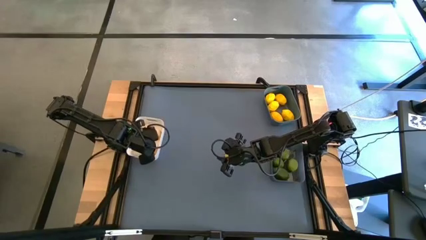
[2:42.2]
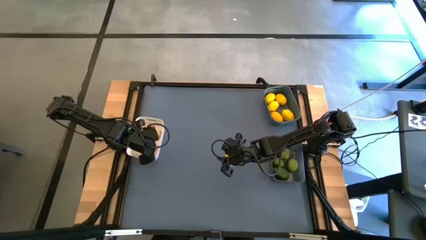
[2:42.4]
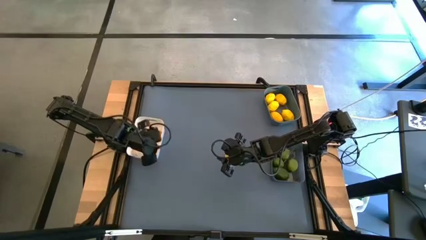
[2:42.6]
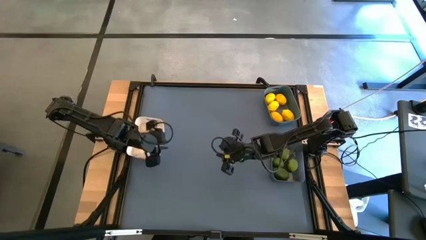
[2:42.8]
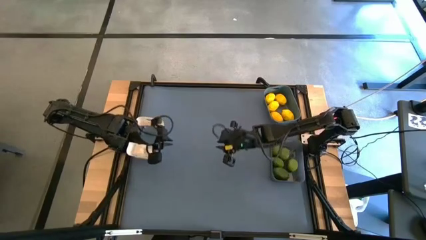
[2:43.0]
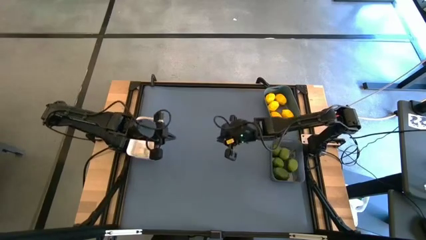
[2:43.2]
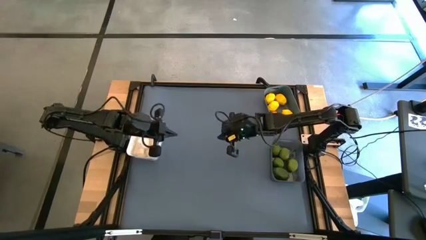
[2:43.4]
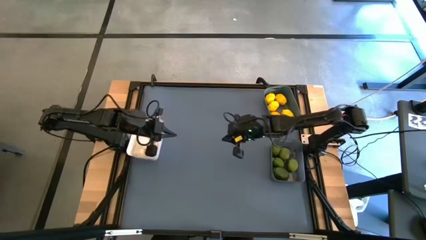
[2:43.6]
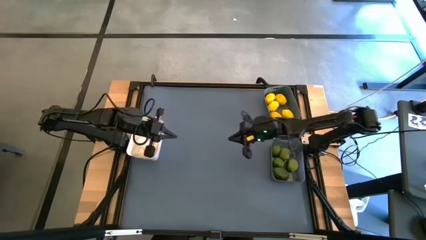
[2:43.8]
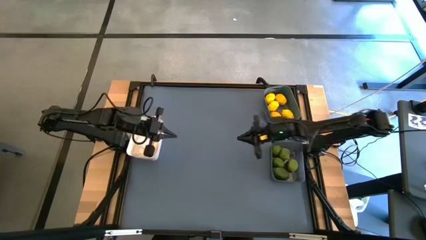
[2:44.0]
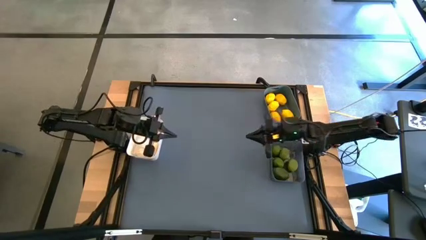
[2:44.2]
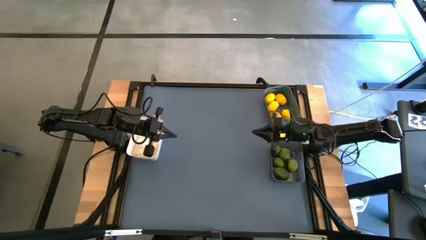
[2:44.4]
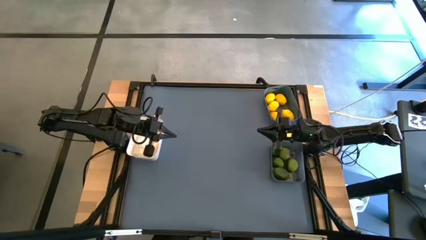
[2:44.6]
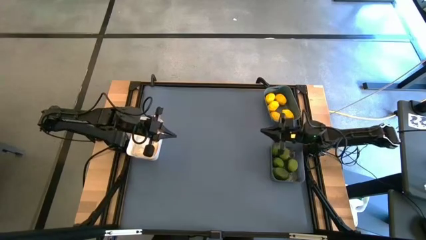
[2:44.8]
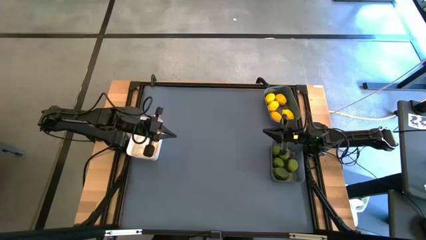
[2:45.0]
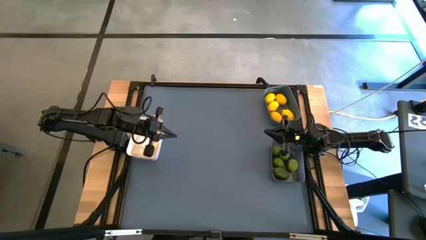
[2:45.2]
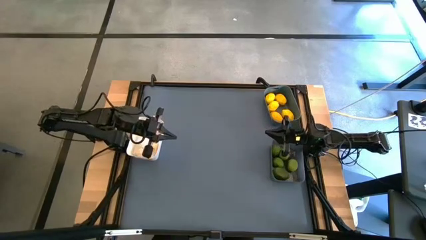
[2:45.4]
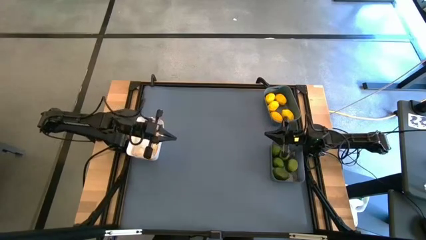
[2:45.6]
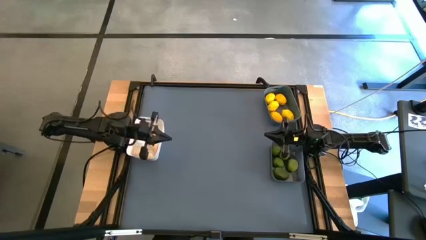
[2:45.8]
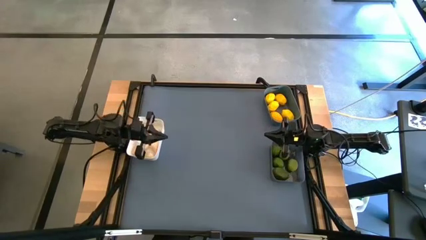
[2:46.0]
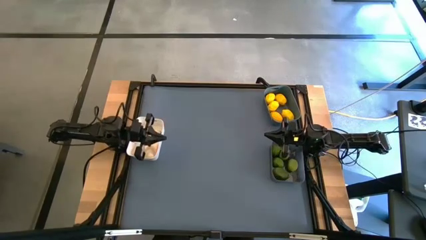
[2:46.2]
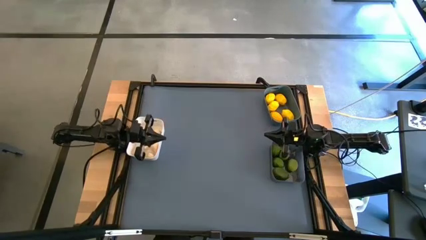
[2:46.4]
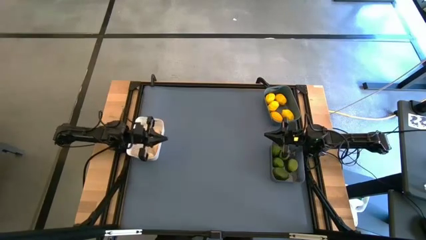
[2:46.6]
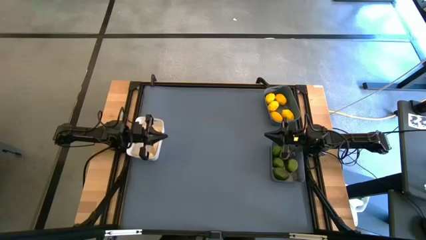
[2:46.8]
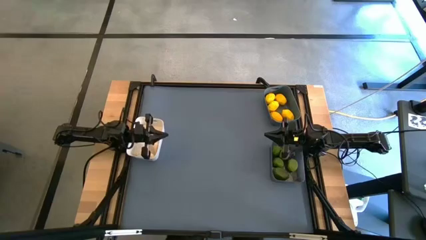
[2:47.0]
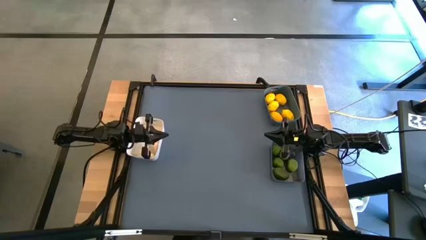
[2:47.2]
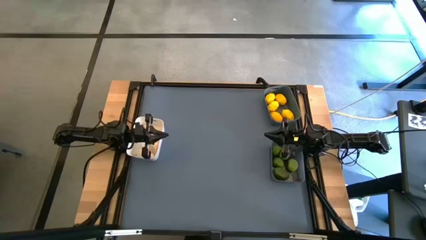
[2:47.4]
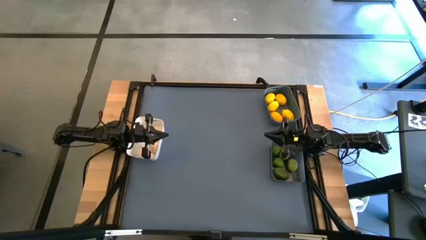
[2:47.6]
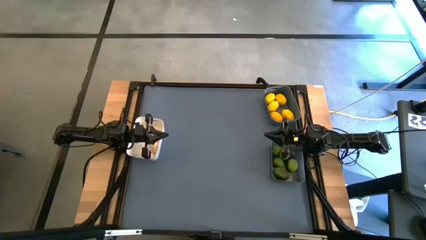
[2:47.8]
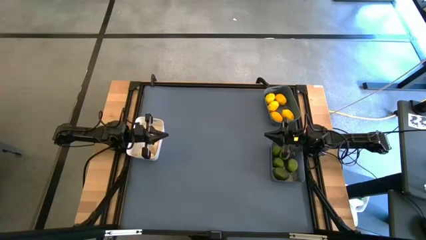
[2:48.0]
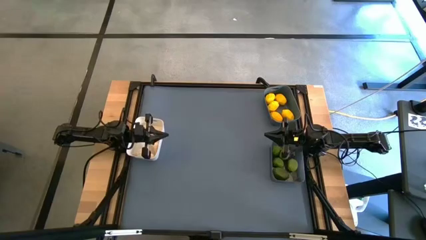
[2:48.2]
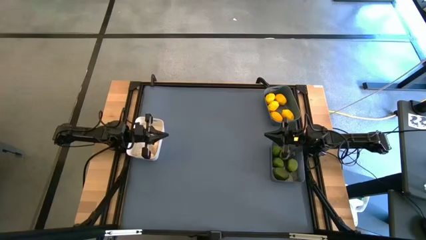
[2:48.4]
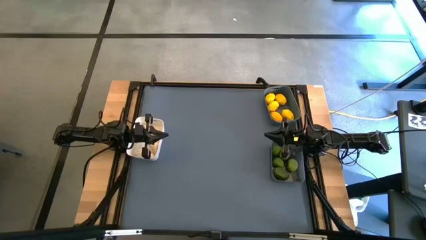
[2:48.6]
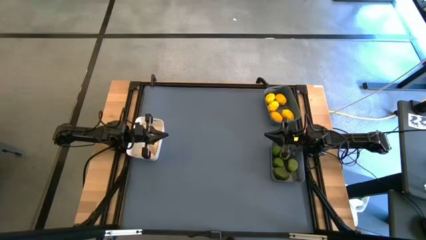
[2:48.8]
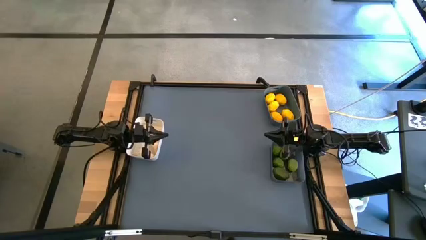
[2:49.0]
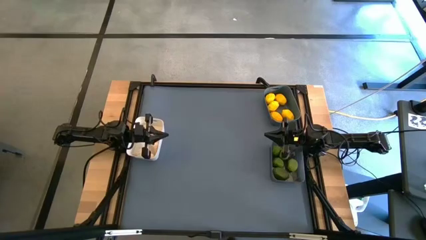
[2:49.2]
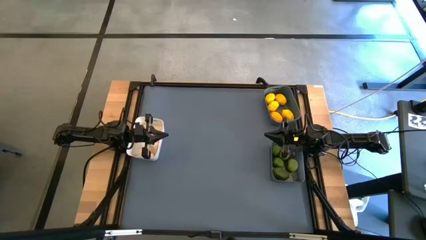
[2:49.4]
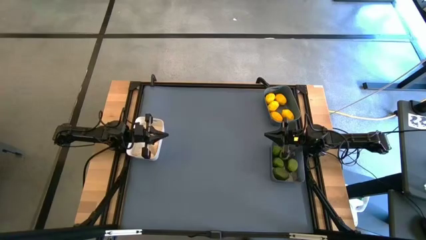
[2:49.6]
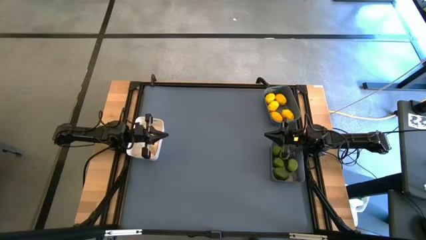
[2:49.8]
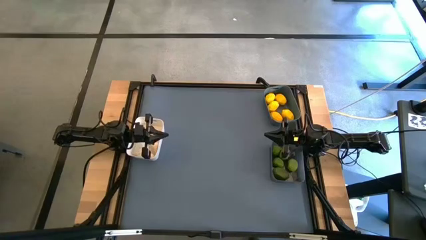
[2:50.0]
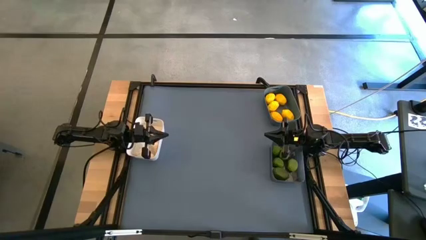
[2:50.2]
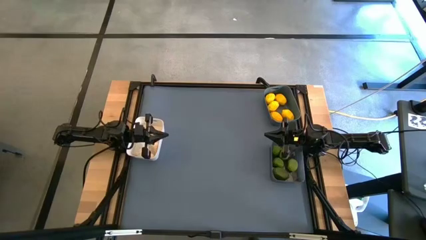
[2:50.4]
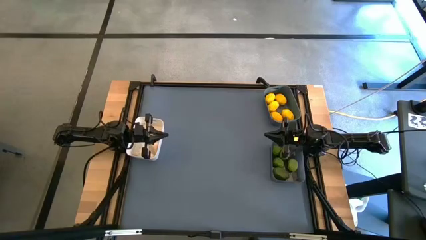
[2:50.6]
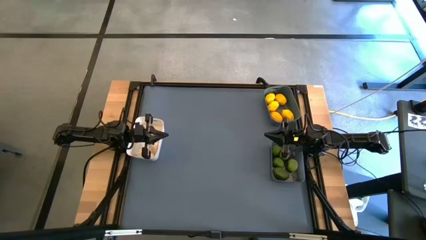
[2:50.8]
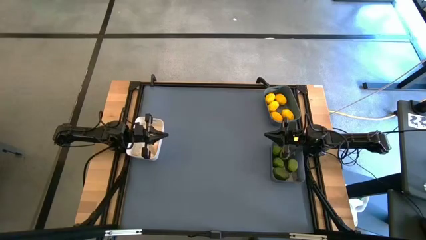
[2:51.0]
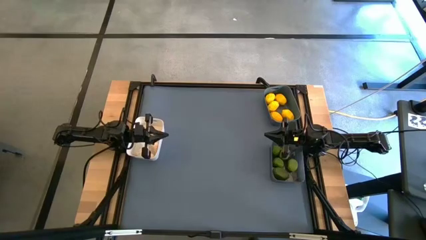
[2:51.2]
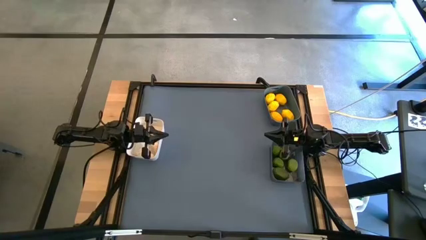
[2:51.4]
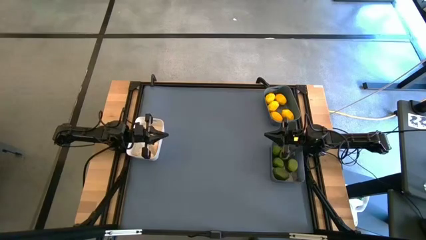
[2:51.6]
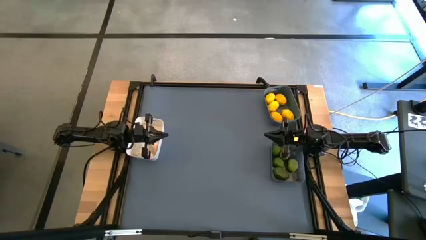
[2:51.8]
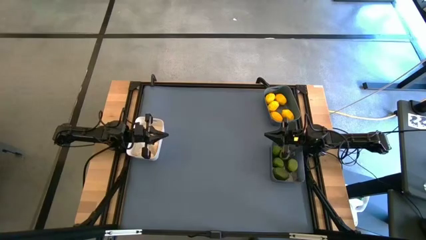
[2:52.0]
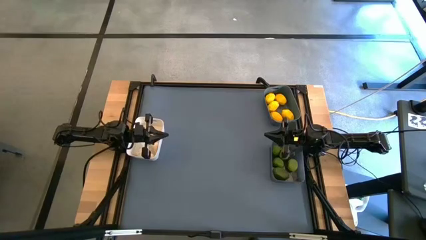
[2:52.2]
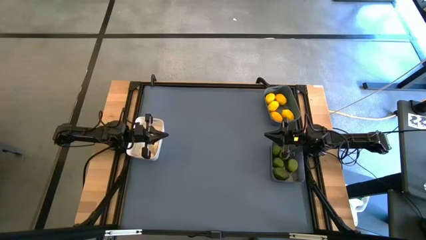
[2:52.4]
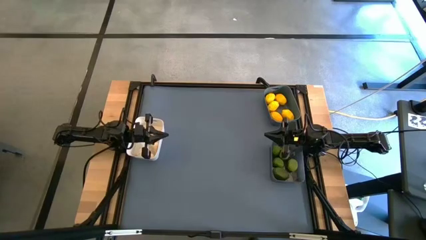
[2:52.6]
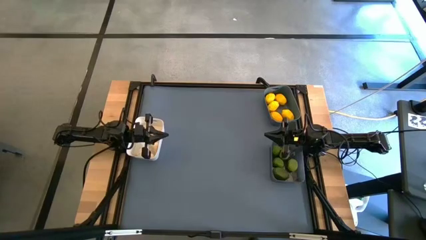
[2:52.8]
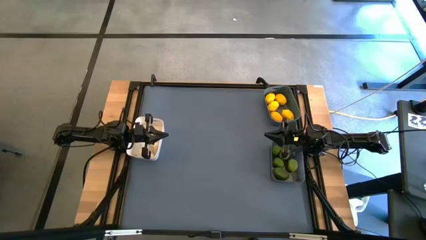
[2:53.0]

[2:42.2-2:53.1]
Task: Sort produce into baskets
Return to Home Position

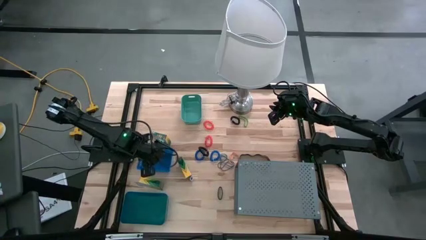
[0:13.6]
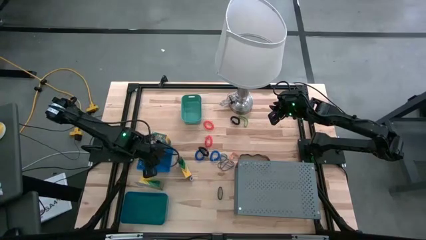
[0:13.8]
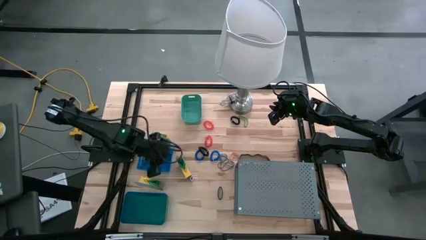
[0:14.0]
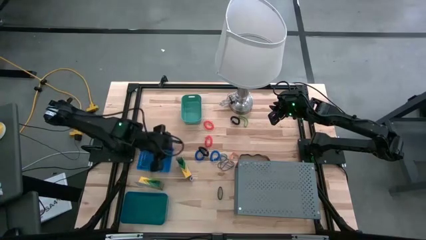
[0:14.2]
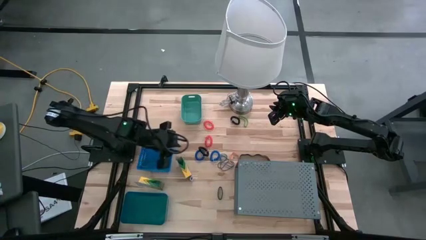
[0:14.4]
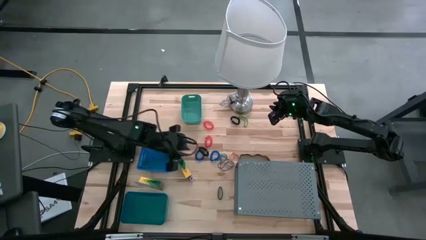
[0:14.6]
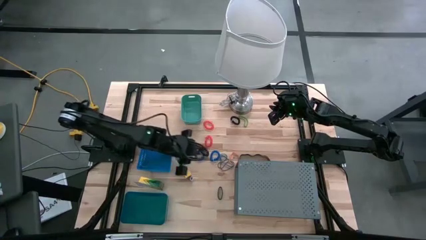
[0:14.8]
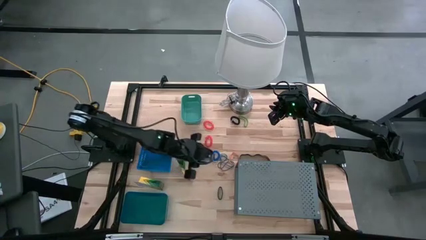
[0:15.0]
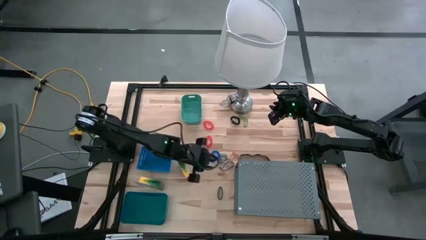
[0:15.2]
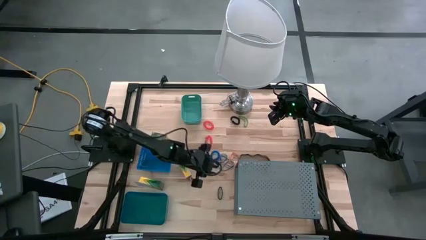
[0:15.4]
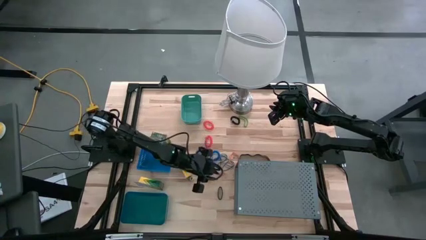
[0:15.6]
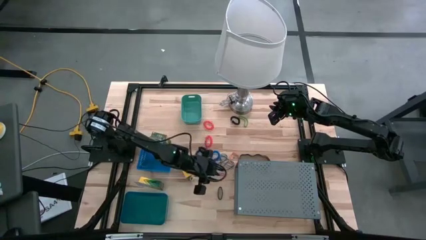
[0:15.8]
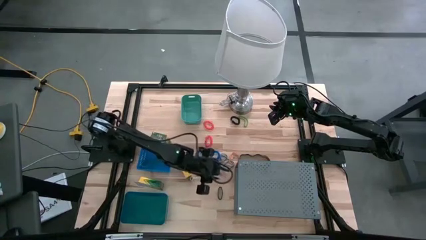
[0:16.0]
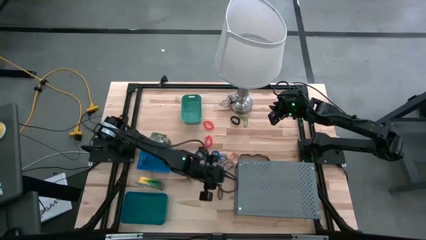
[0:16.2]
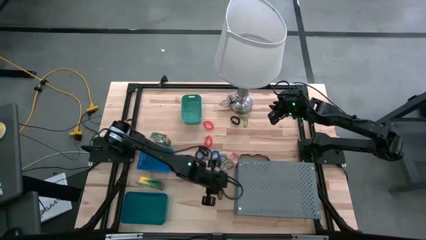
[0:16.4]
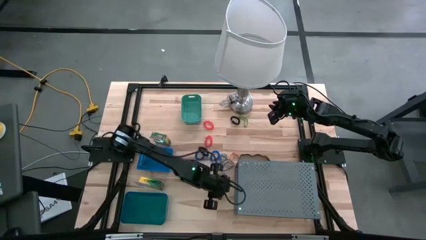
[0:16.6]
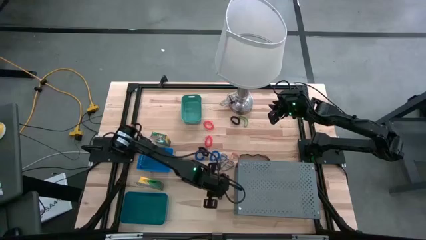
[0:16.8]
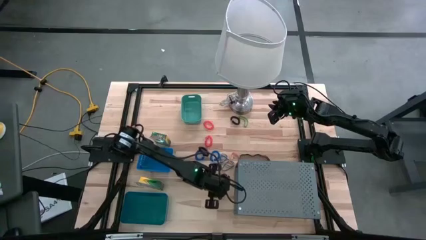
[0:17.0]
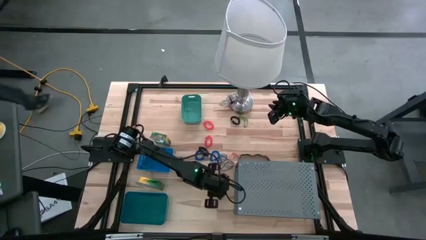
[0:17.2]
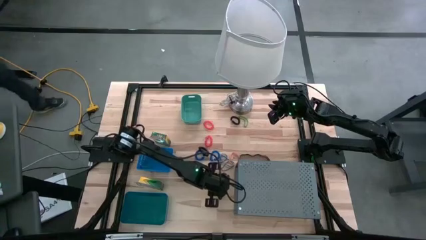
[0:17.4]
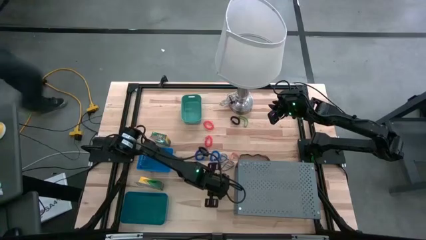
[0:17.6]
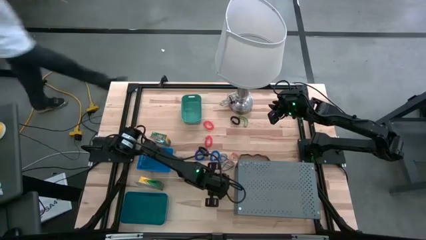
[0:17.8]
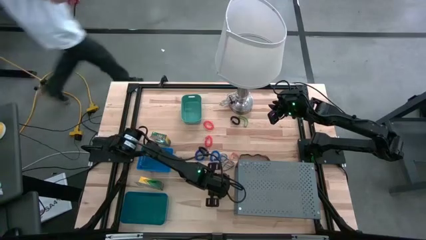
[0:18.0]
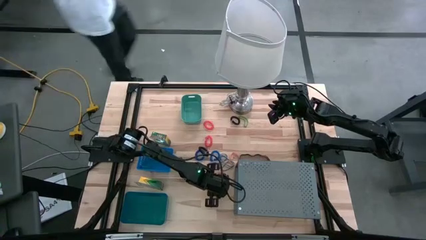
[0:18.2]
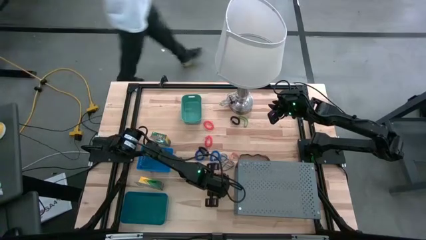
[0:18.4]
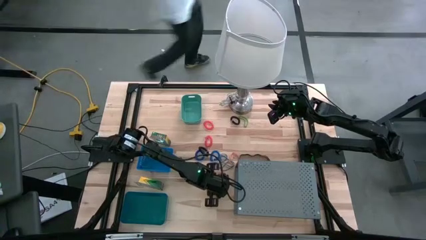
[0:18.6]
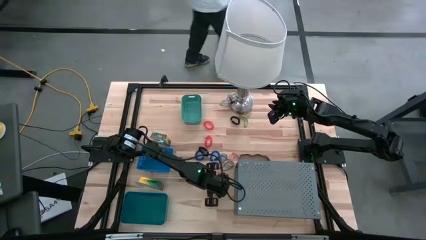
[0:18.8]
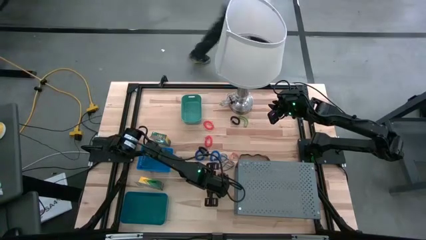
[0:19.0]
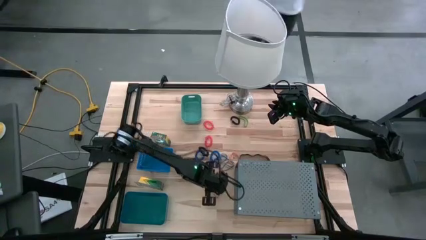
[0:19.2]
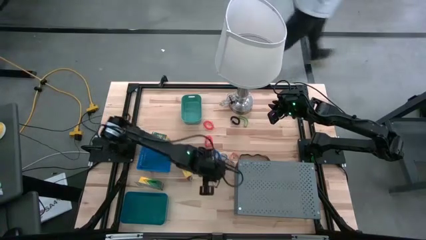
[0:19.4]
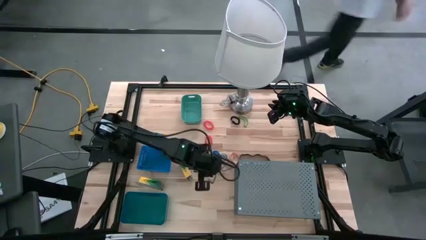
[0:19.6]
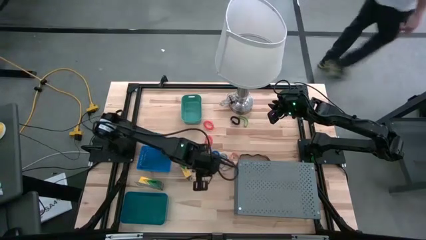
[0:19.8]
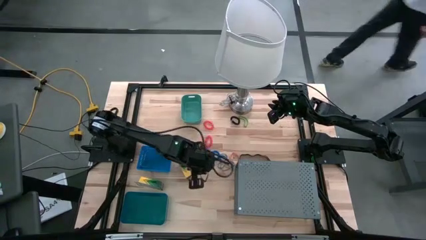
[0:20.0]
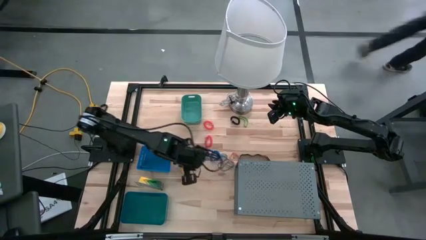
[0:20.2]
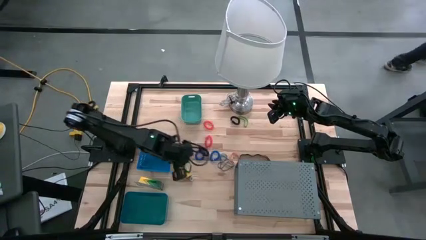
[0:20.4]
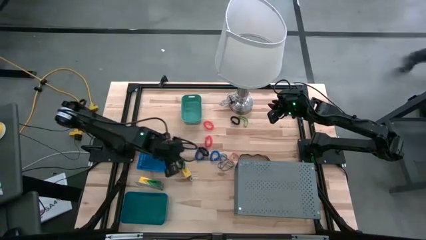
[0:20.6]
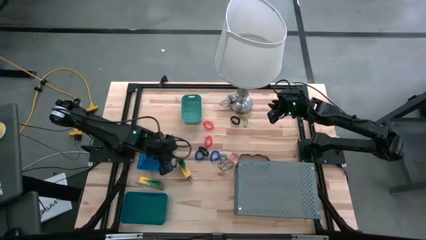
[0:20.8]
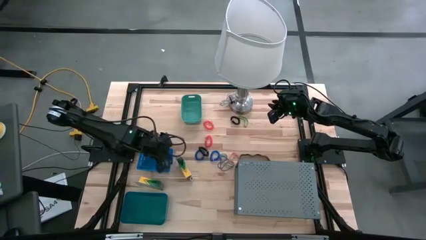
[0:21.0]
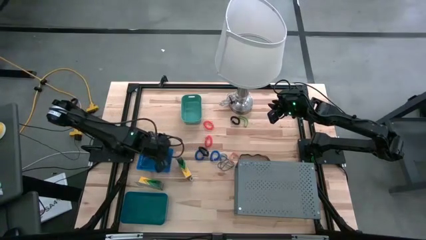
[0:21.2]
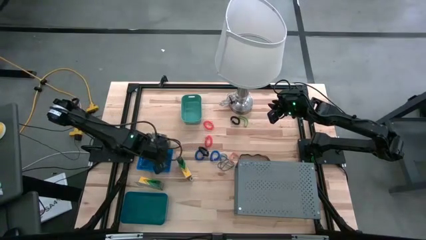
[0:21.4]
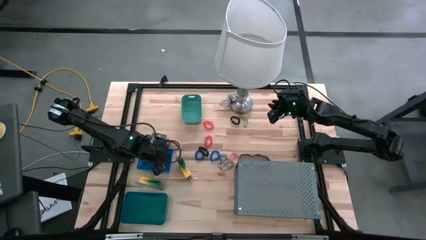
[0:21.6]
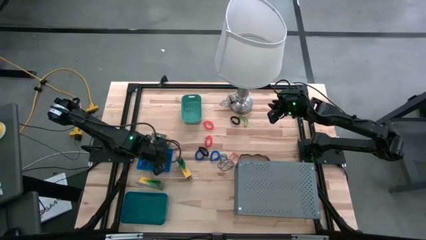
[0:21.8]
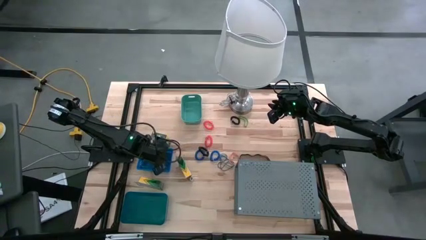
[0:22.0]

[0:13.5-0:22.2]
Task: Pick & Place Office Desk Supplies
Put the black rubber bands into the top blue bin
